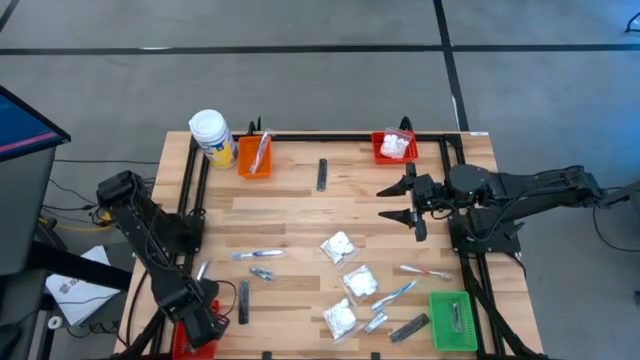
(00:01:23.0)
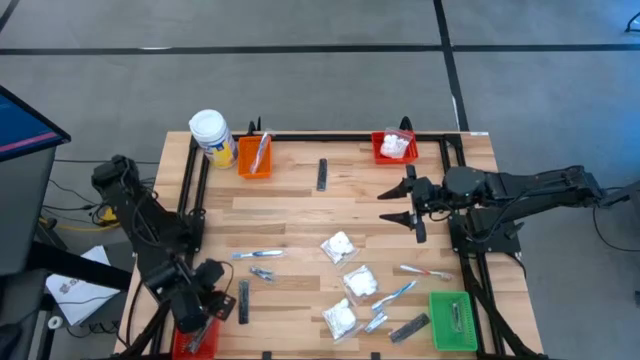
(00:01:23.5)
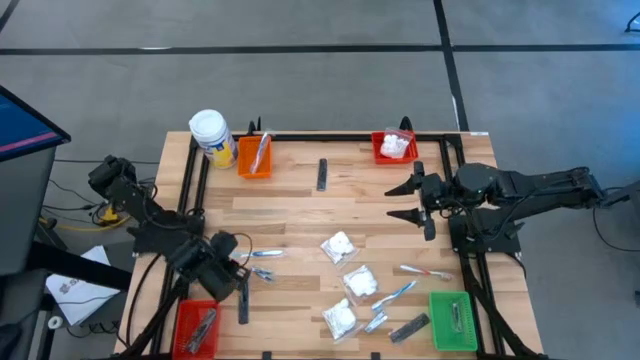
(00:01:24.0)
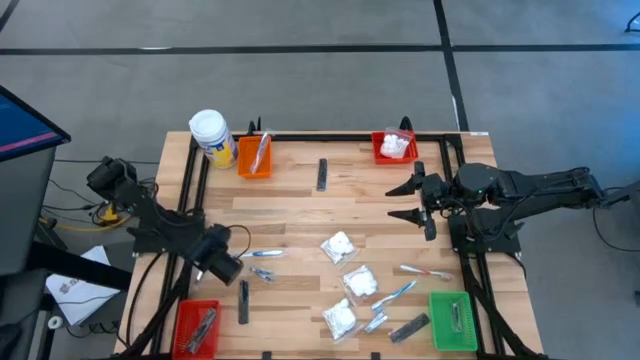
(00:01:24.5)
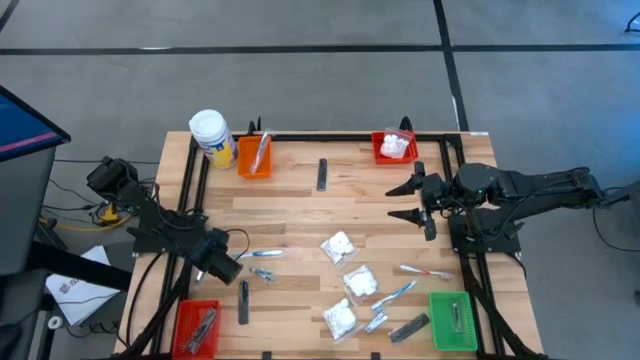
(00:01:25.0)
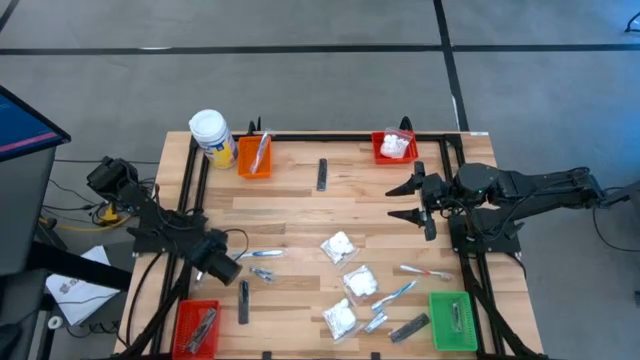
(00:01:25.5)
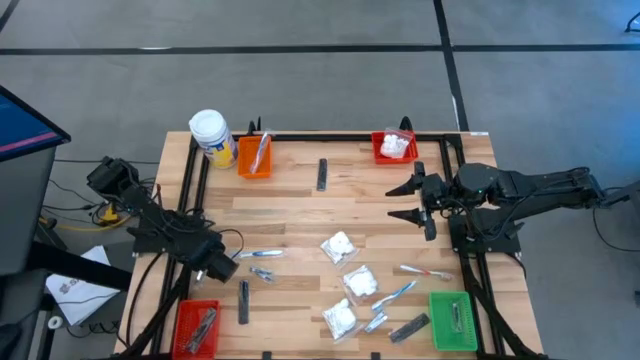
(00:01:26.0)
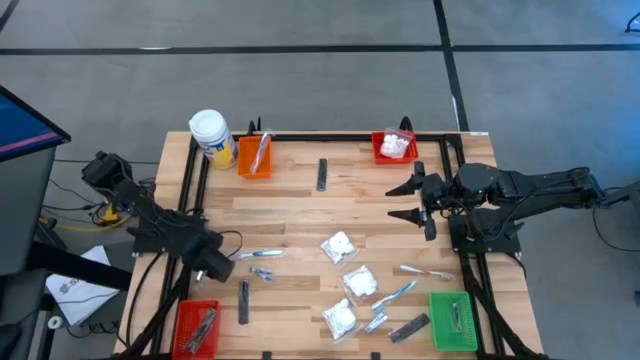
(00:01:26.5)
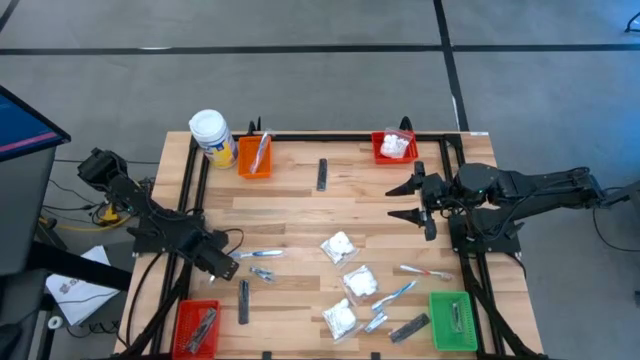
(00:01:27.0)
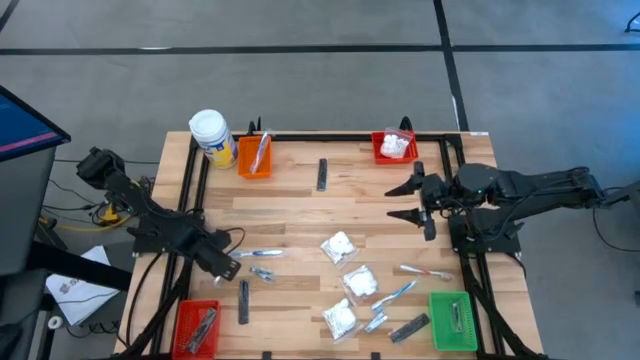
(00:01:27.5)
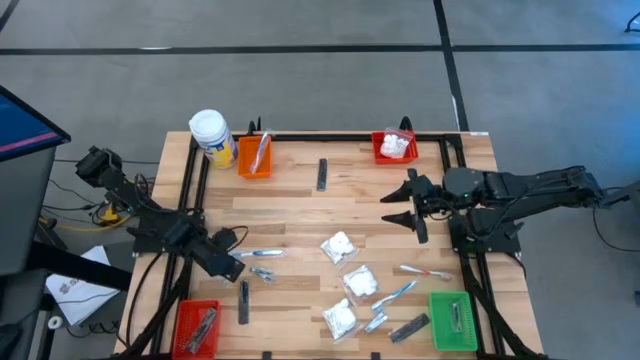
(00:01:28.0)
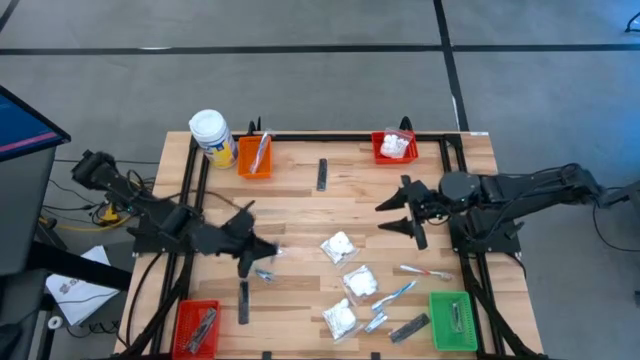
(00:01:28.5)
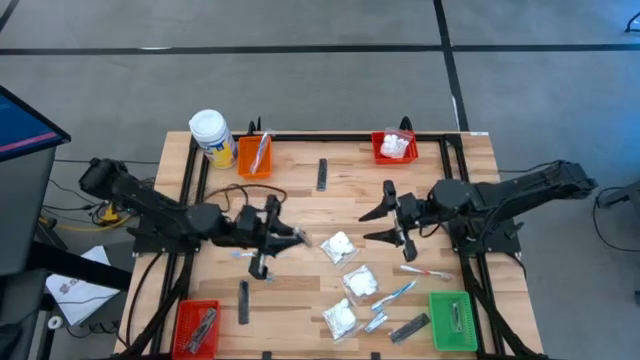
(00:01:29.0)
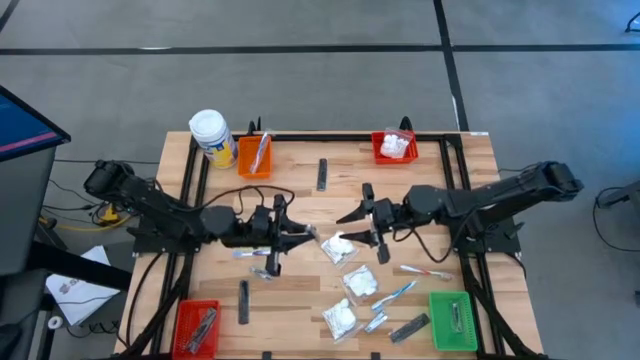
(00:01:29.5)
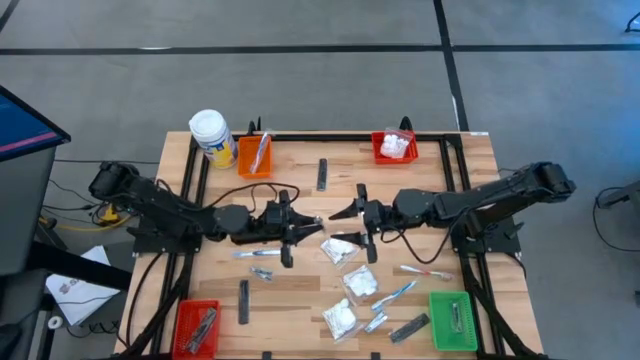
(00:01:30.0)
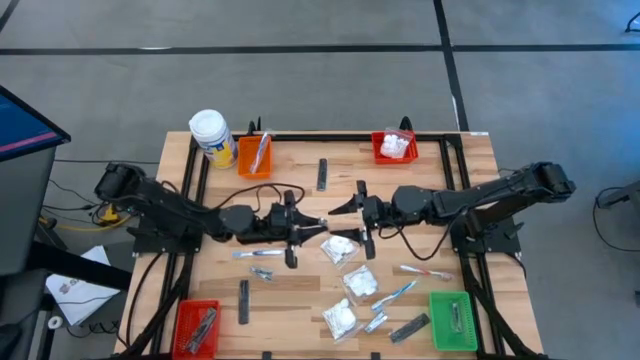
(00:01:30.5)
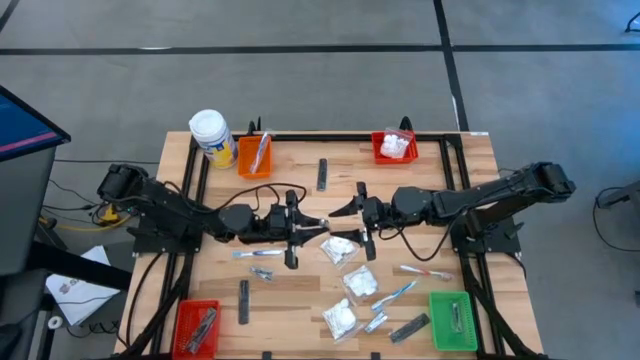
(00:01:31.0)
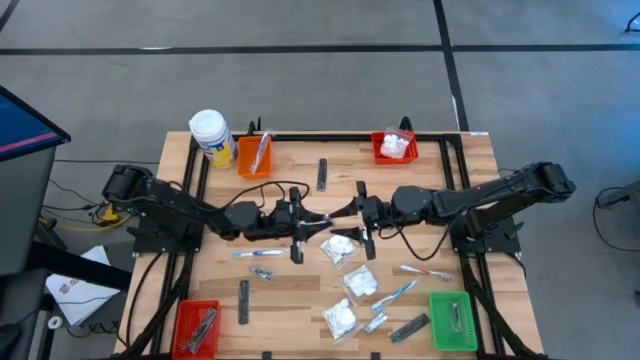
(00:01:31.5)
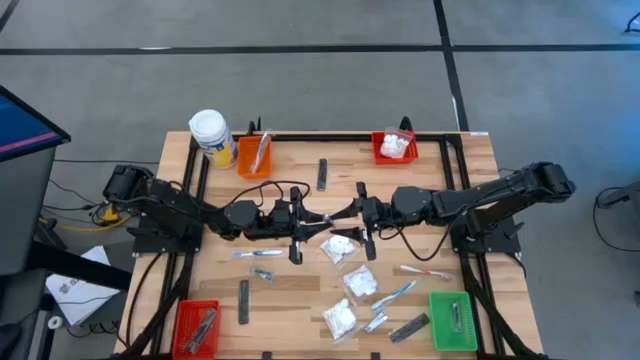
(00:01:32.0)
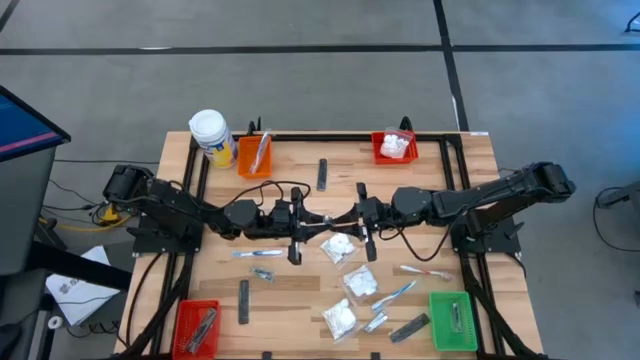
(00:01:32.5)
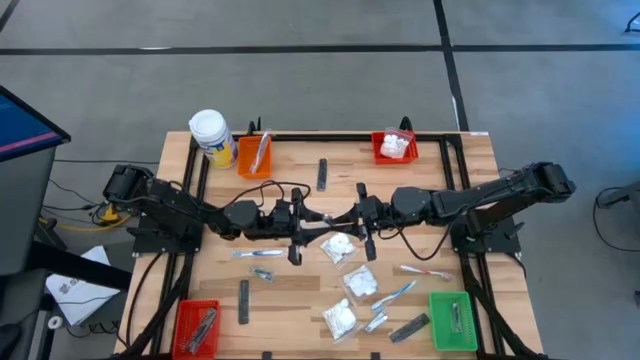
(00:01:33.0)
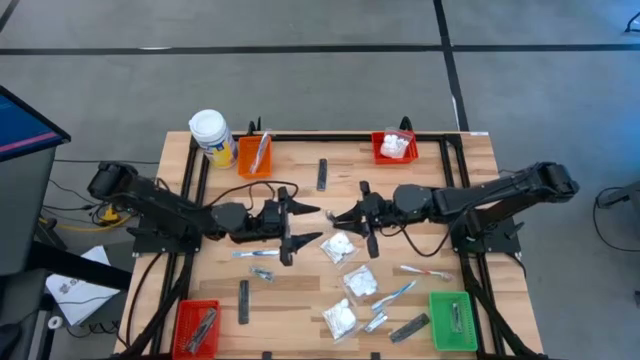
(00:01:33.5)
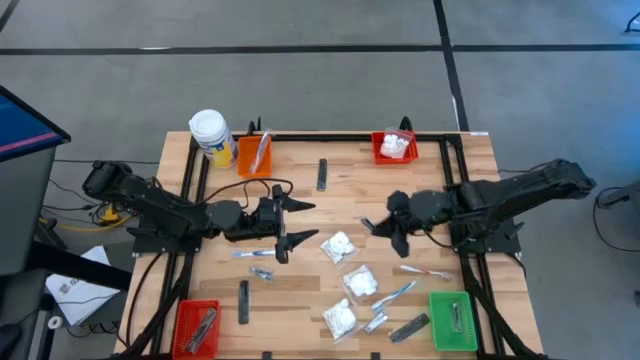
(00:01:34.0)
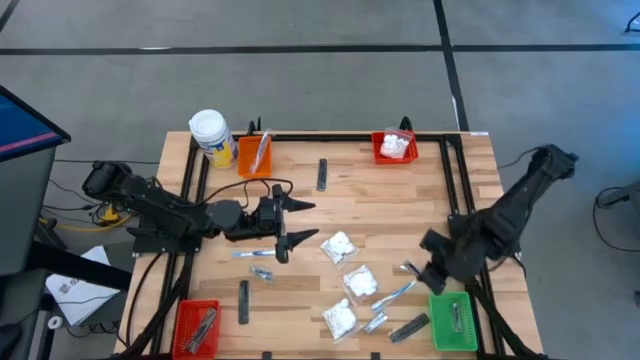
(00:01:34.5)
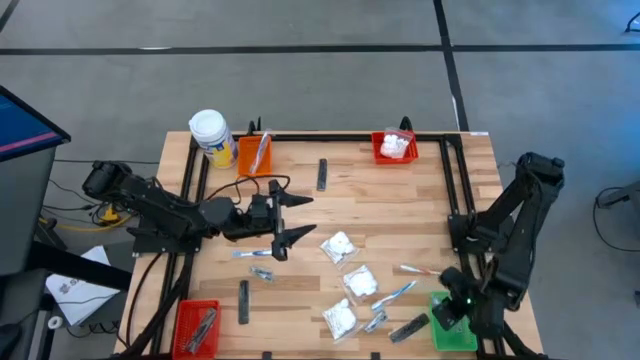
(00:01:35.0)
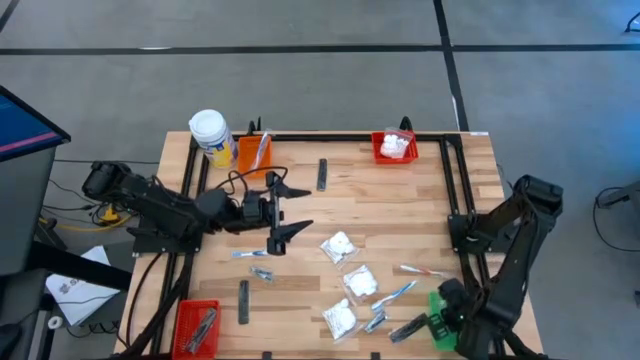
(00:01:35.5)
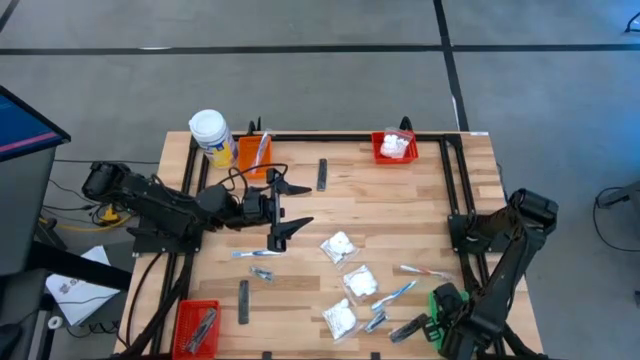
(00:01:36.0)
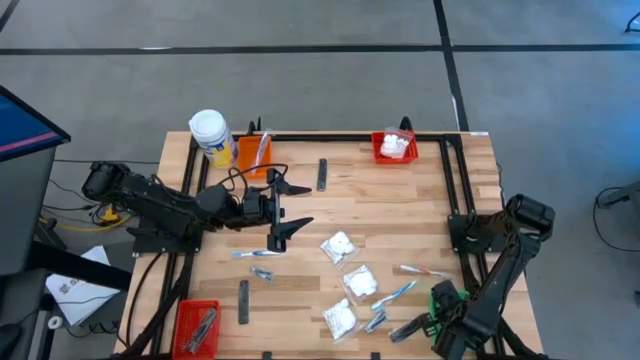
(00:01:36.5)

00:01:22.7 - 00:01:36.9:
Task: Pick & Place Travel size toiletries
Put the left nail cutter into the green bin

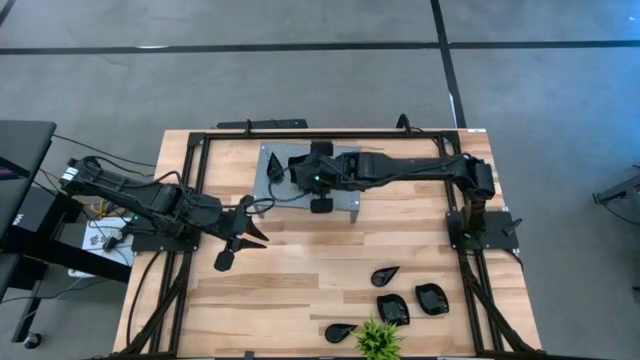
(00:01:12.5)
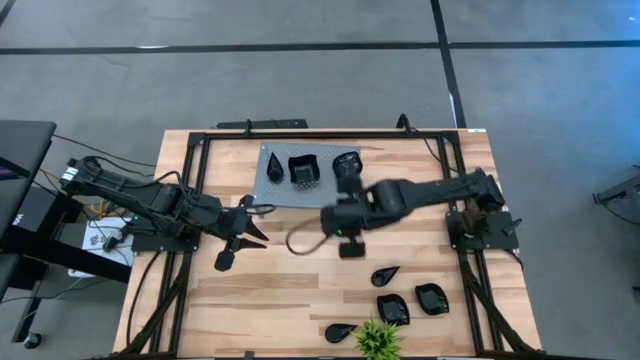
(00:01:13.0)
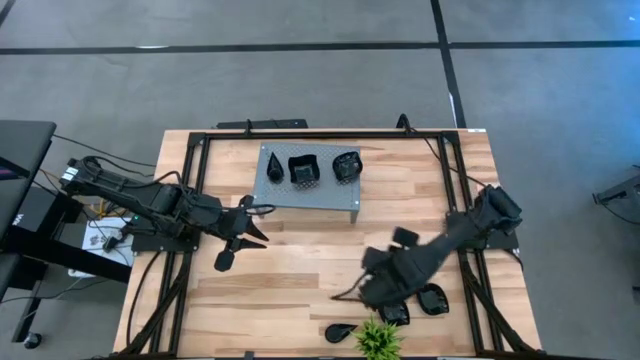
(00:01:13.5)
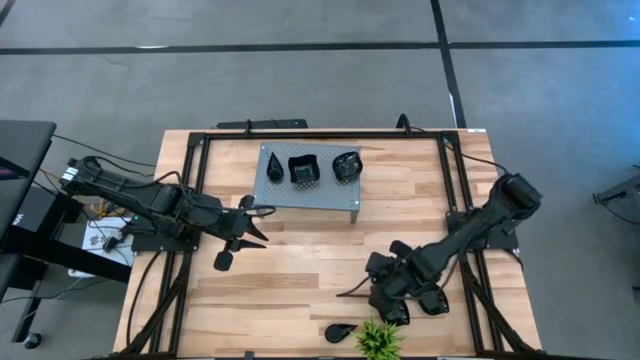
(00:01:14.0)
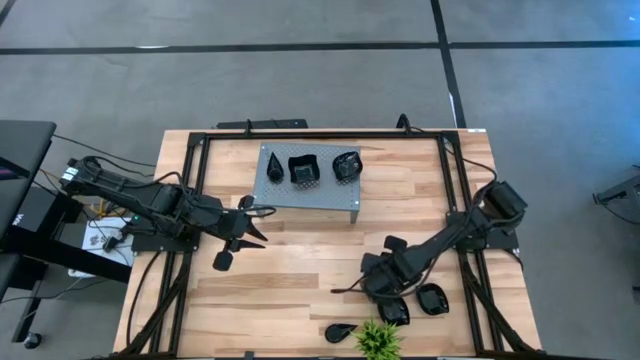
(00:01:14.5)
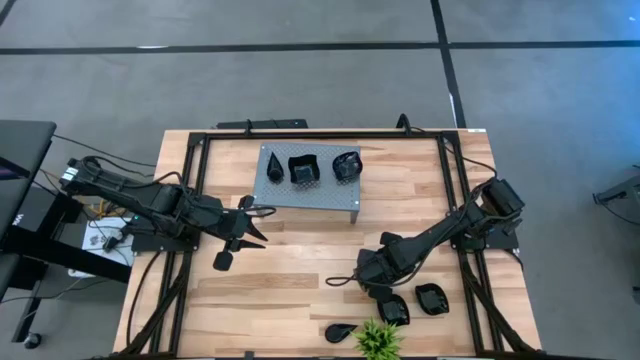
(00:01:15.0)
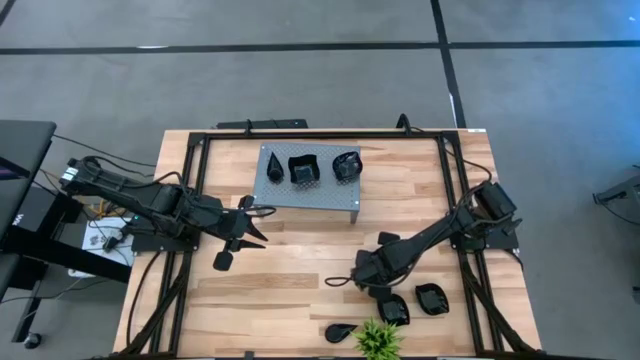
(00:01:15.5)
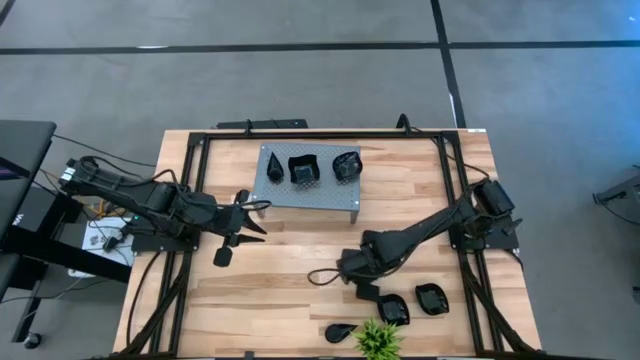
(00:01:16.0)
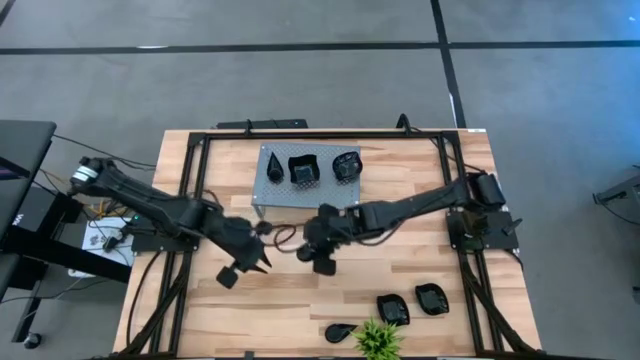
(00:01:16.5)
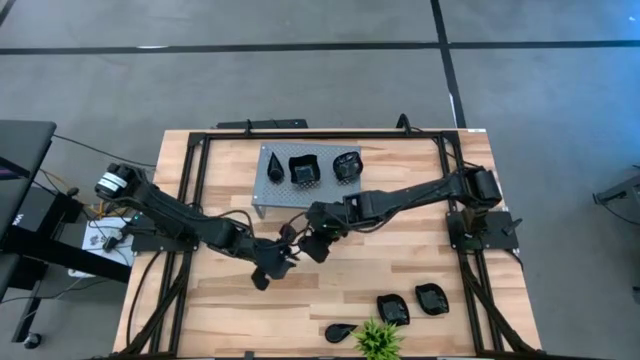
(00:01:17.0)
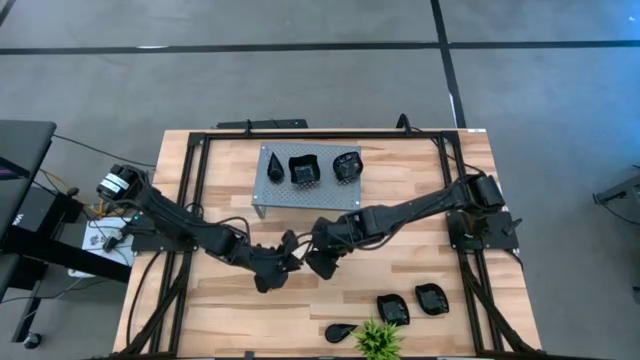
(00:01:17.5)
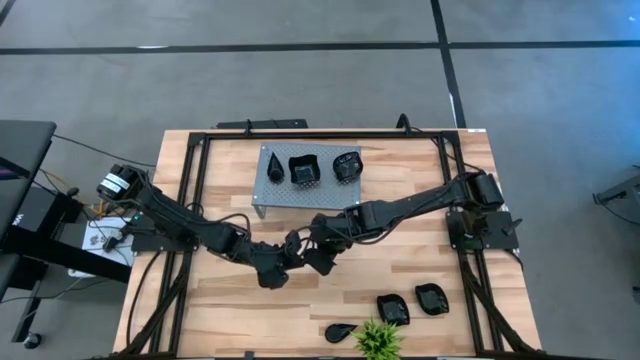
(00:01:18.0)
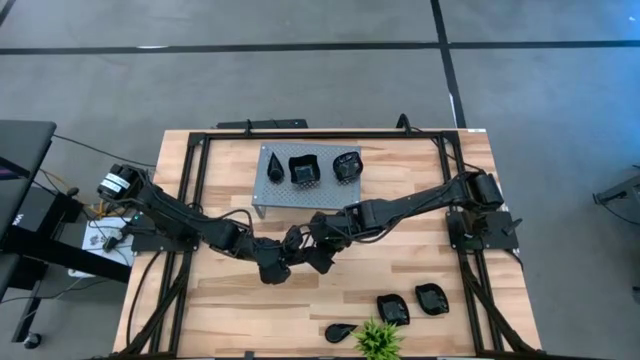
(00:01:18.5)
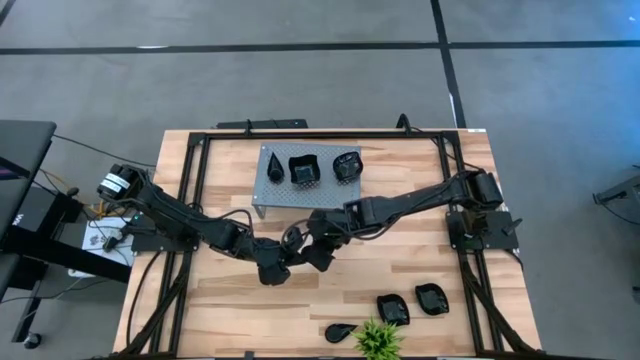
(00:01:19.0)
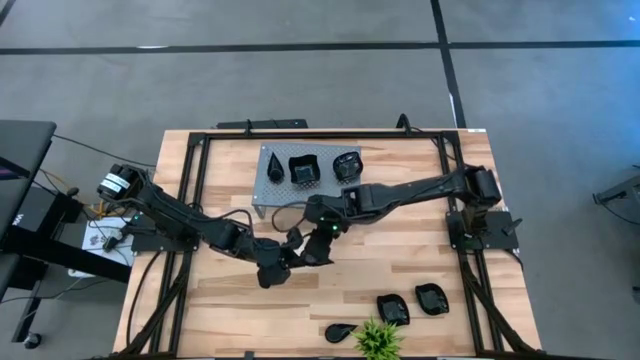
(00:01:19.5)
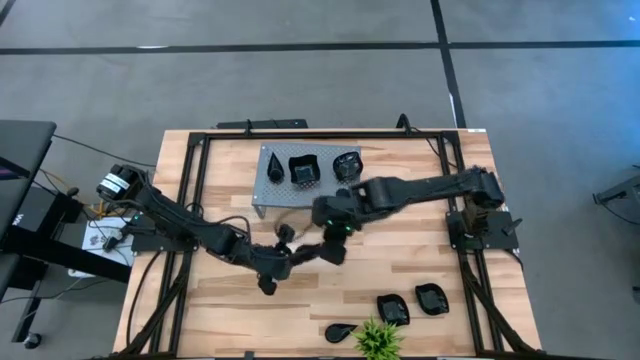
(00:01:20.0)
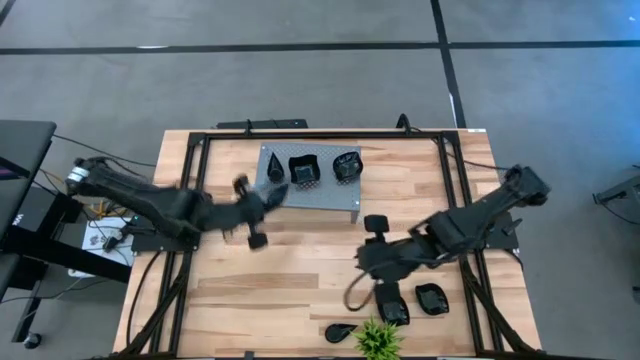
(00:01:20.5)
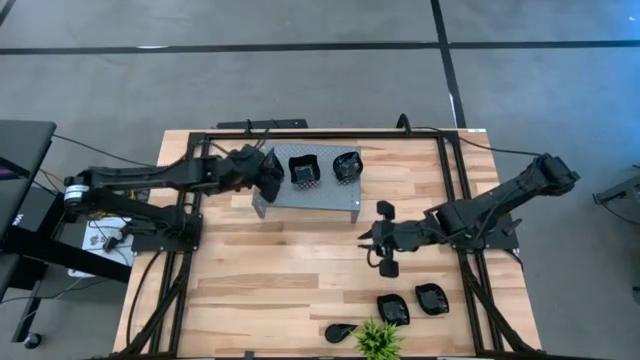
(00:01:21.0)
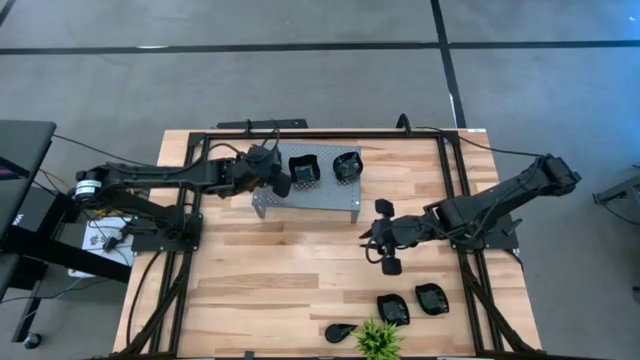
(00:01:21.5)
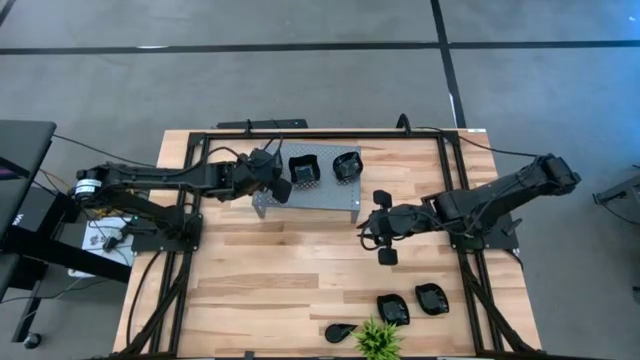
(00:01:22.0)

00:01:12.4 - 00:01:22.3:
Task: Pick & Place Mini shaped plates
Stack the black drop-shaped plate on top of the black drop-shaped plate on the shelf
